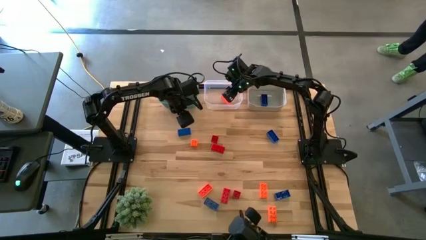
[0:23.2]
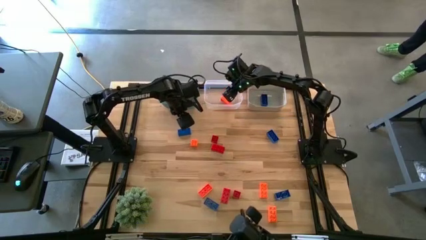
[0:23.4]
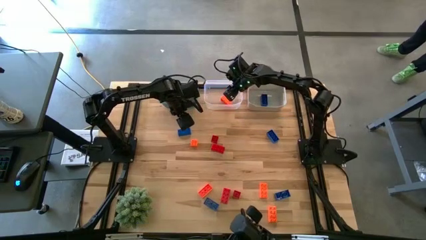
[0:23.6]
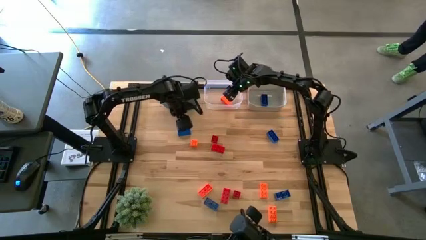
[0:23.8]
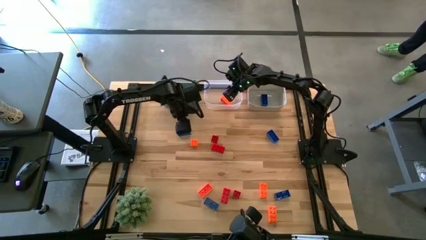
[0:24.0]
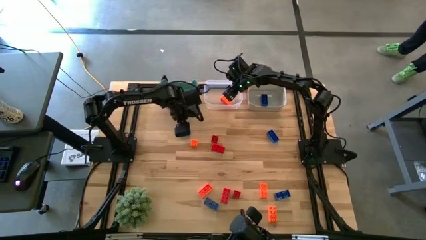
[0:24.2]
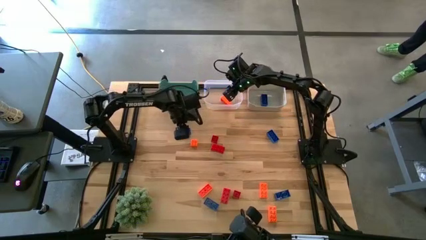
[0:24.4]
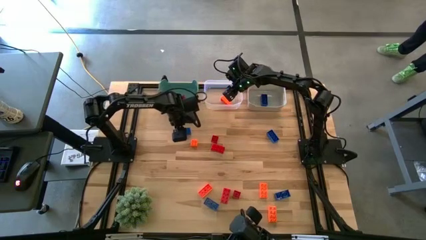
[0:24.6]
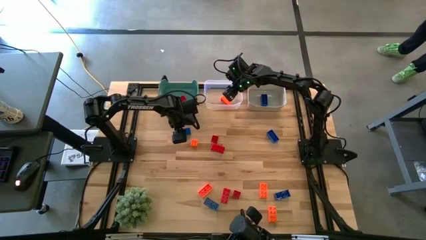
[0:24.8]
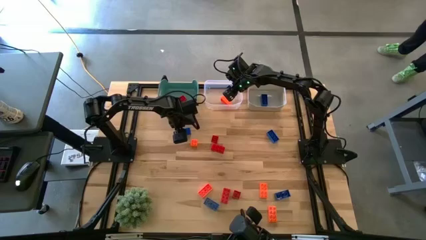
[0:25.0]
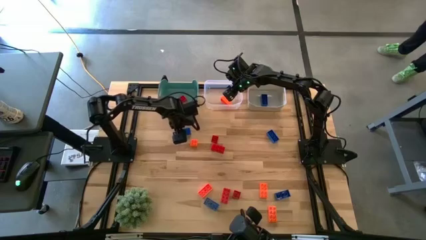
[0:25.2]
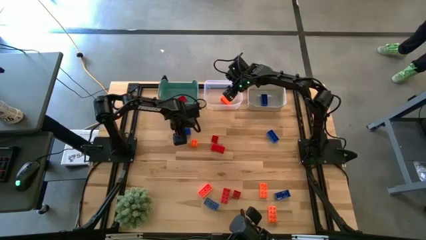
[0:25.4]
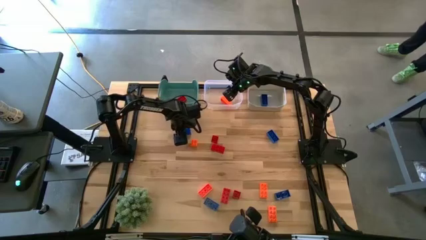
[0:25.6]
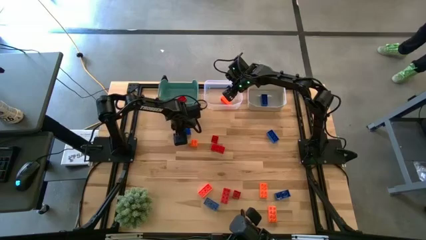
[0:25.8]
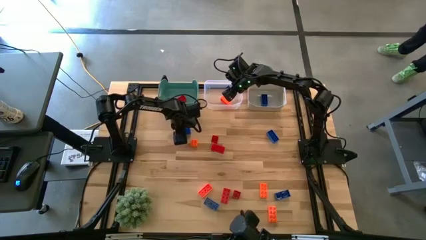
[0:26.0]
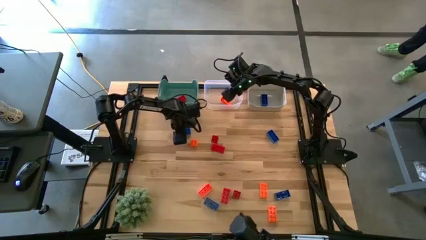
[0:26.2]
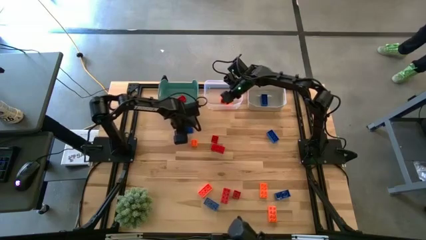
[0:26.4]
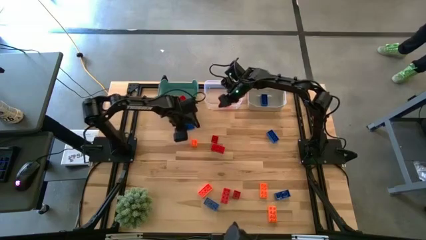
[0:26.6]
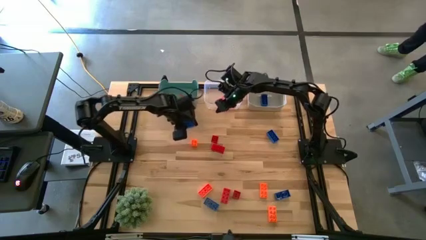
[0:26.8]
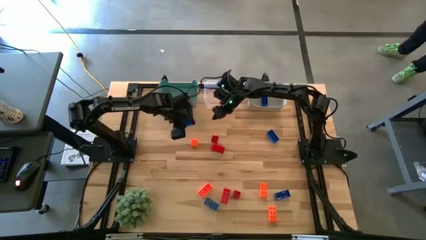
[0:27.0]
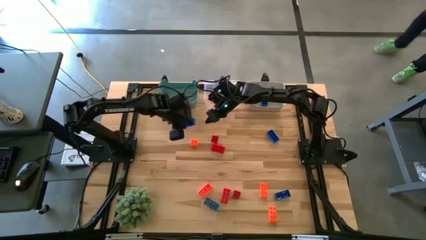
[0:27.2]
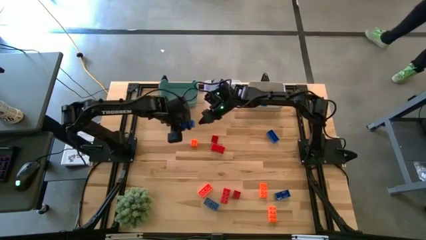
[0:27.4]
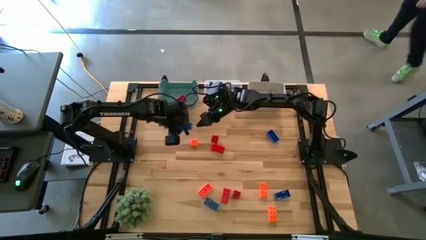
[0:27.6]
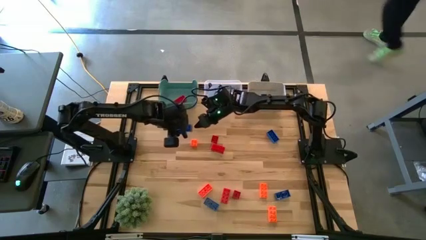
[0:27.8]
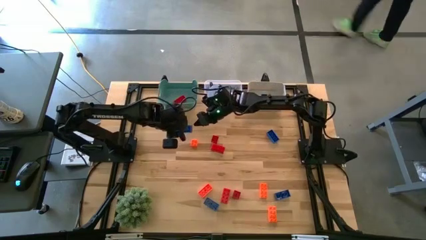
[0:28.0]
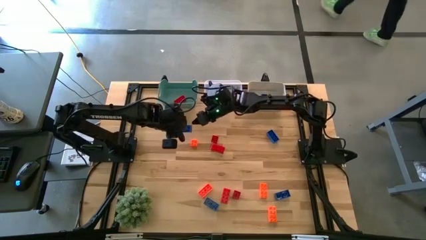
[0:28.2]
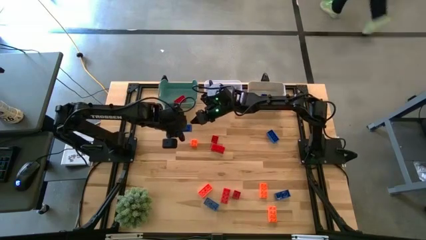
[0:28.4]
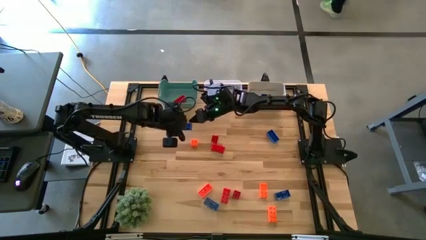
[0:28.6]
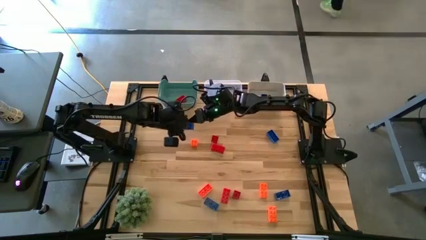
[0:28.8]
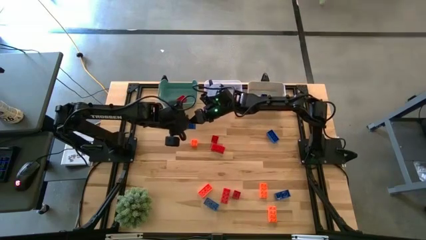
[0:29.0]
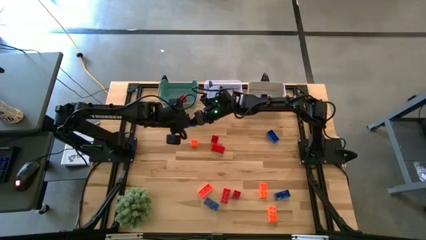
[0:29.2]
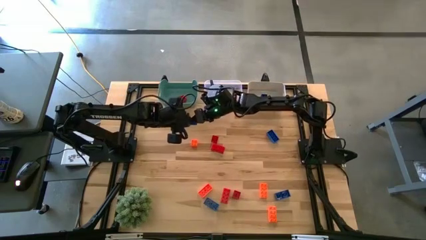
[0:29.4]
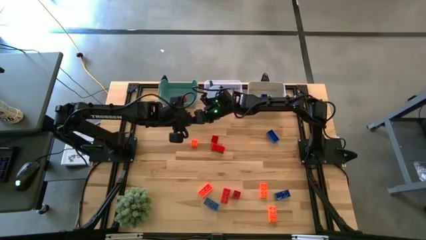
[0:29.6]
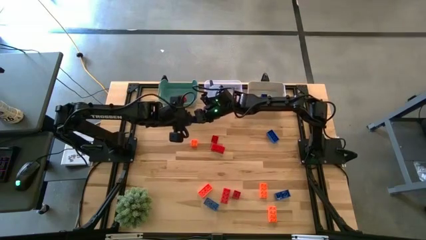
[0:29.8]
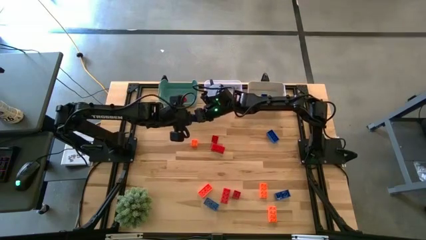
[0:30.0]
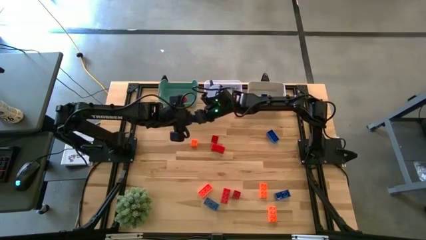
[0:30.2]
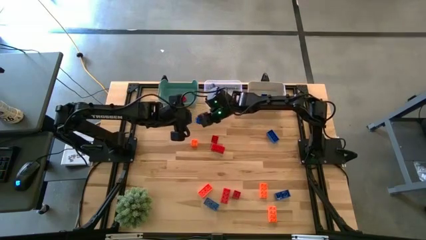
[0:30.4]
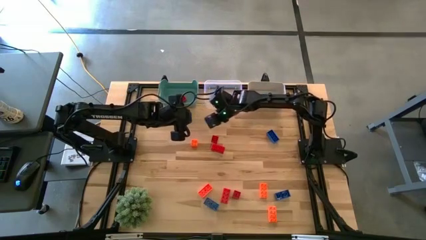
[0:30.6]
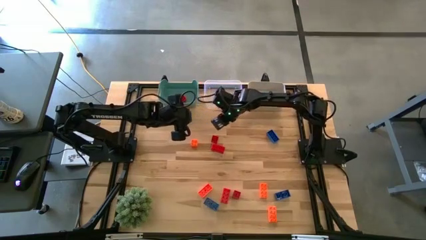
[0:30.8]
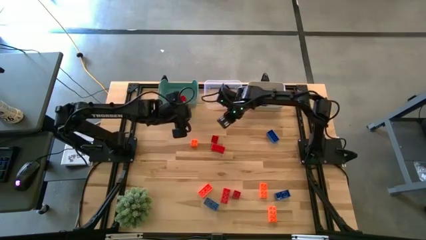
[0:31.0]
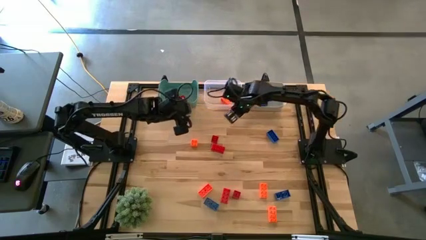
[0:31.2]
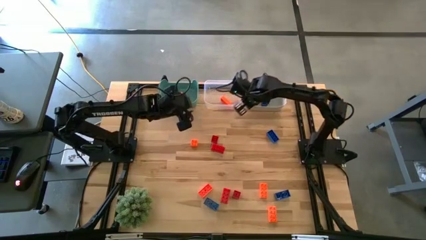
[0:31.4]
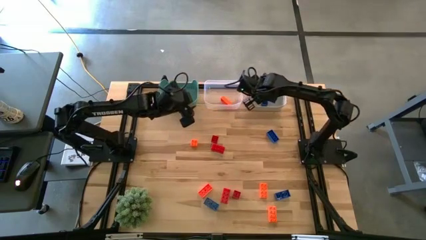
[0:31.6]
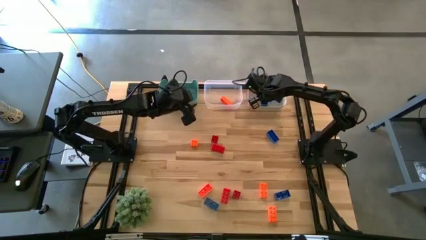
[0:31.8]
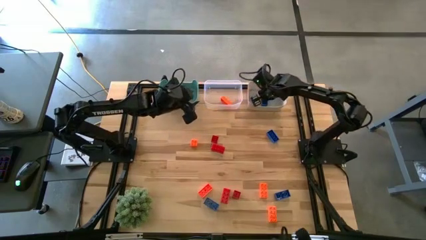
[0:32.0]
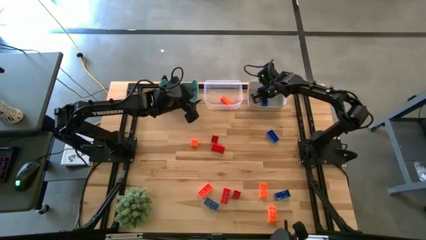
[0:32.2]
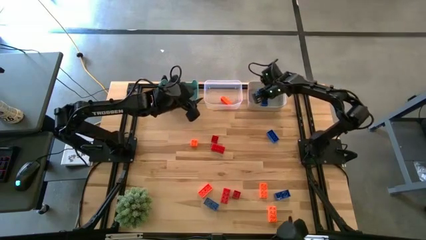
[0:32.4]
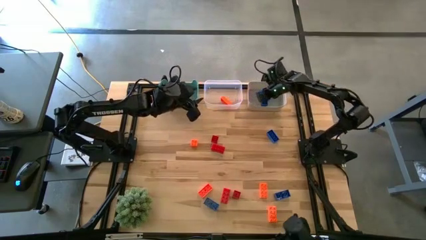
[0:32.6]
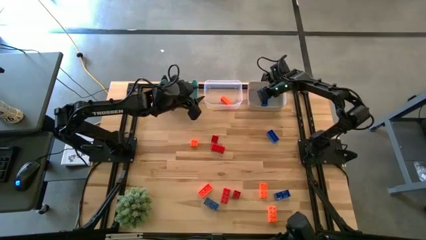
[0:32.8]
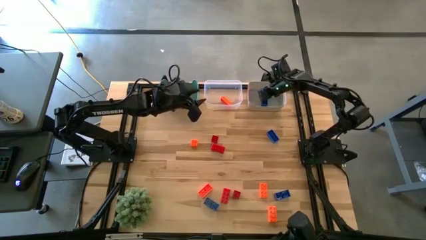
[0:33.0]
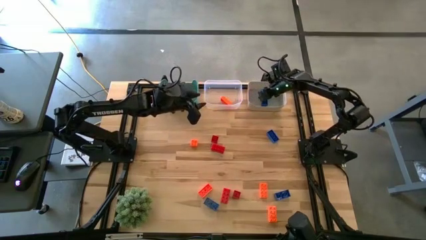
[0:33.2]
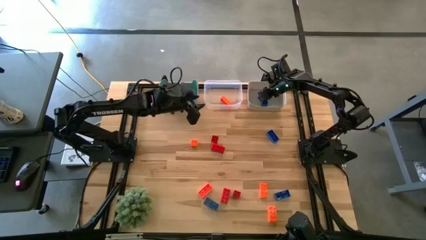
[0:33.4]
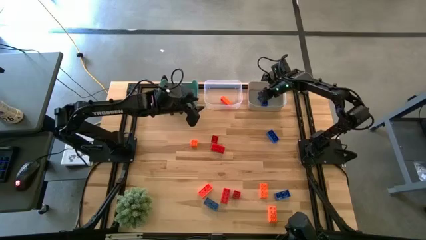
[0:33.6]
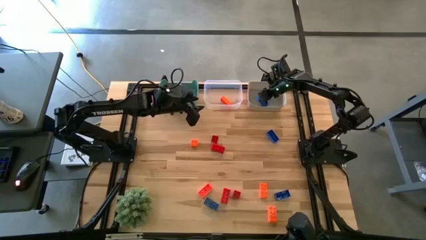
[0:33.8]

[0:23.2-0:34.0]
Task: Sort & place blocks by color
Put the blue game piece into the white bin

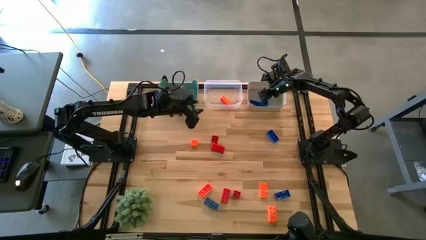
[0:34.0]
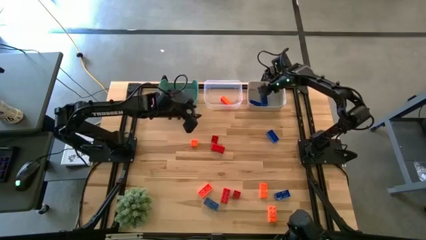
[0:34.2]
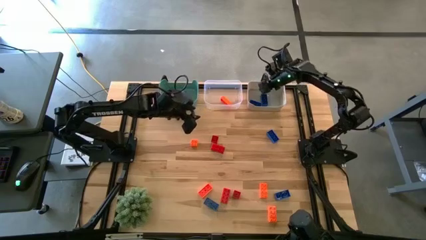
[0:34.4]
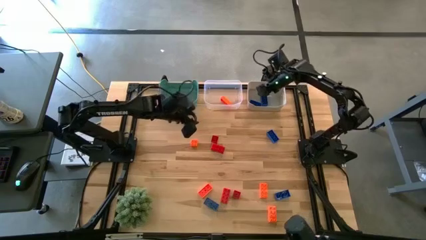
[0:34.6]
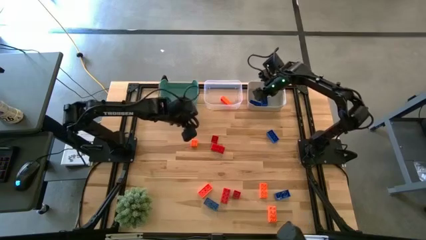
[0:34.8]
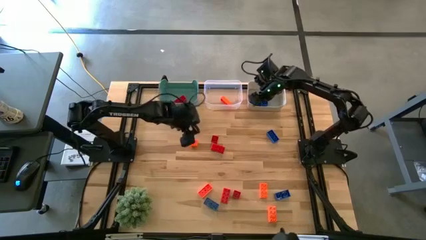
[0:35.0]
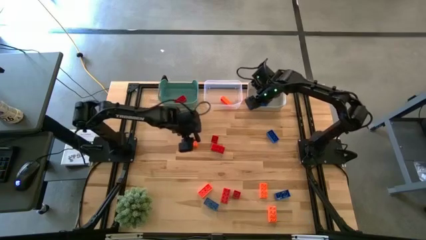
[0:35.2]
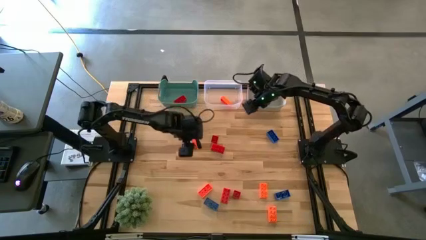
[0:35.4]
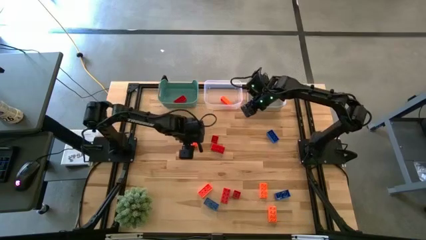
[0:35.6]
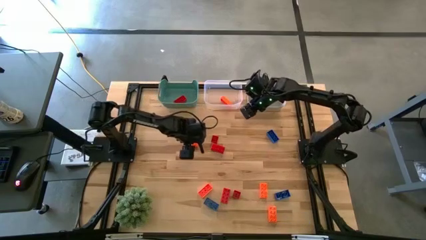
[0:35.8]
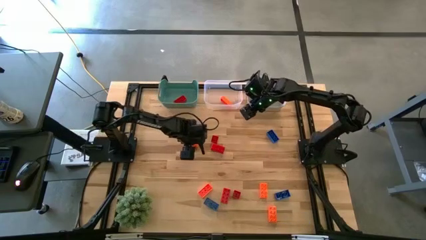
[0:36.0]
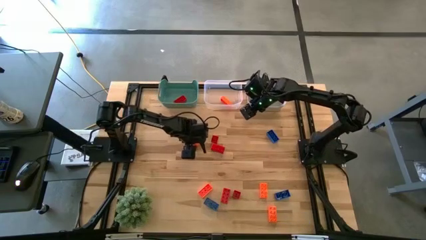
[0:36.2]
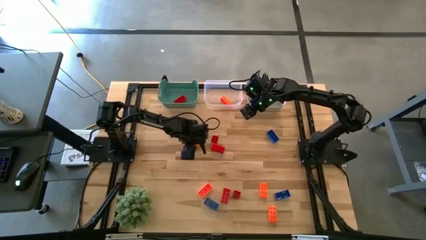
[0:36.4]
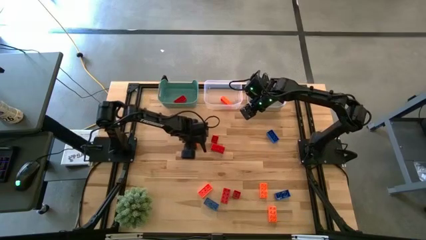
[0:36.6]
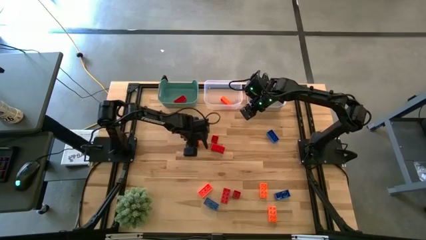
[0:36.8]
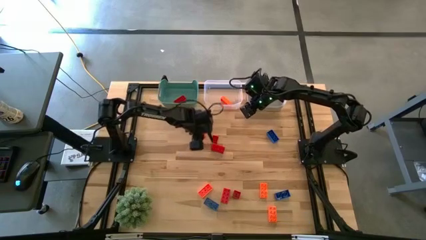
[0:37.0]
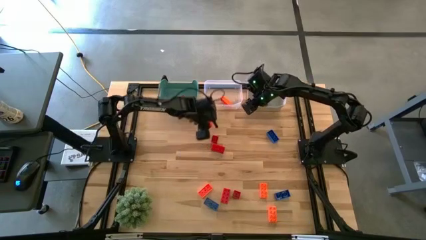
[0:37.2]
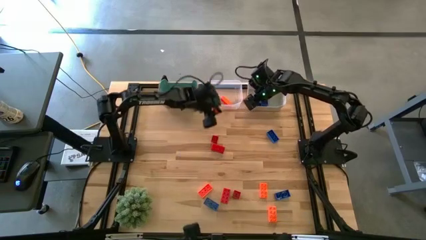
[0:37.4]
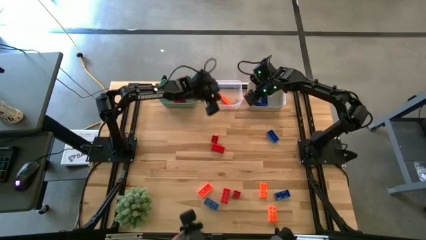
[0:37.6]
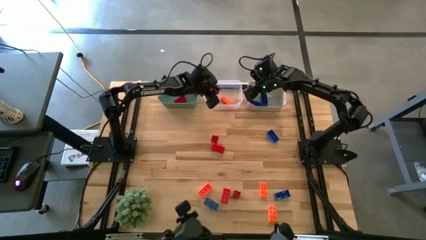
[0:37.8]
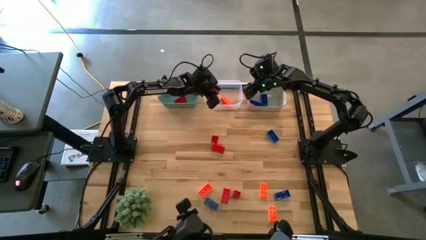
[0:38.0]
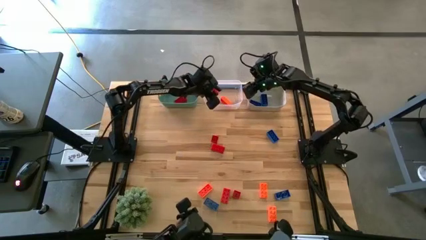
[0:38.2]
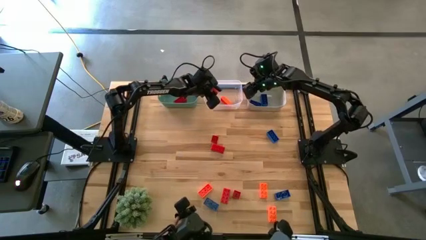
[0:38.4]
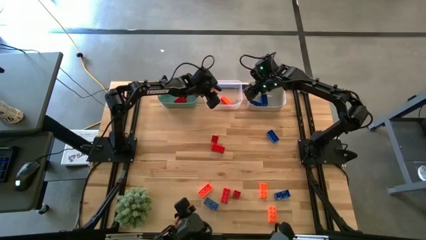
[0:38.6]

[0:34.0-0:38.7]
Put the orange game piece into the transparent bin
